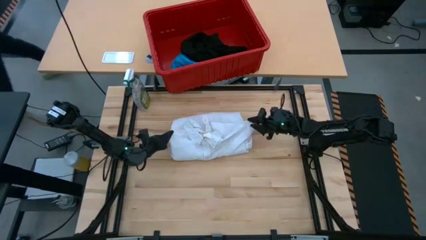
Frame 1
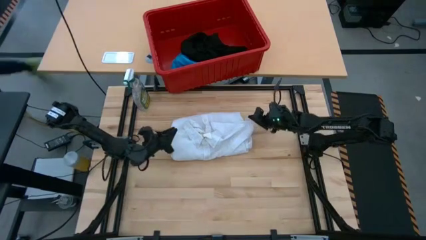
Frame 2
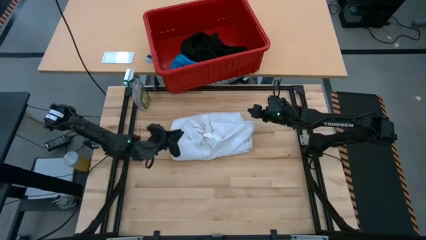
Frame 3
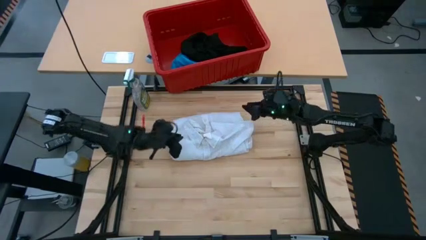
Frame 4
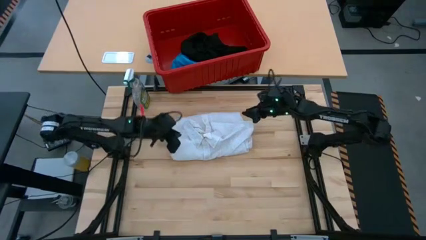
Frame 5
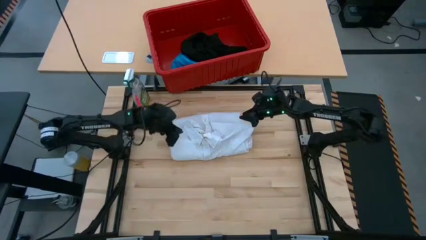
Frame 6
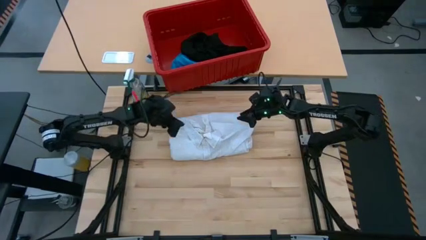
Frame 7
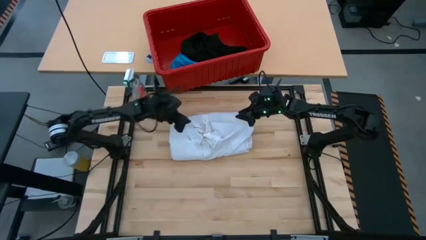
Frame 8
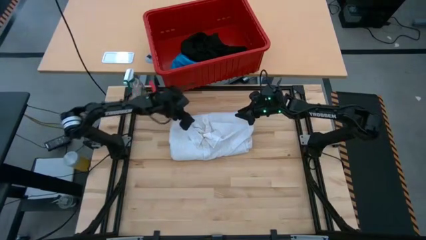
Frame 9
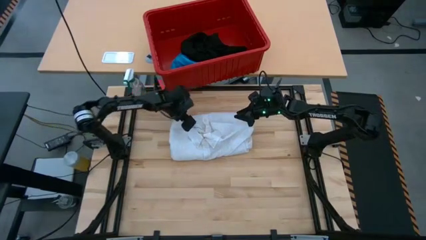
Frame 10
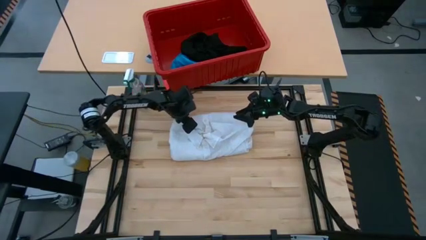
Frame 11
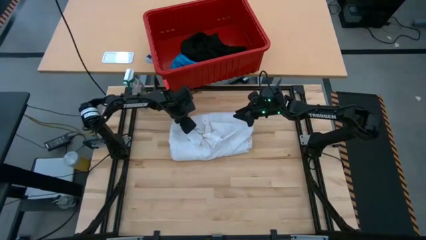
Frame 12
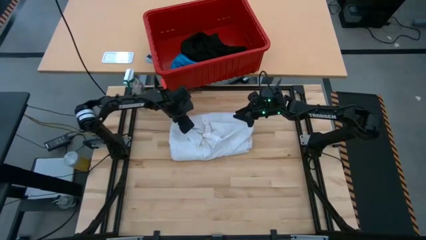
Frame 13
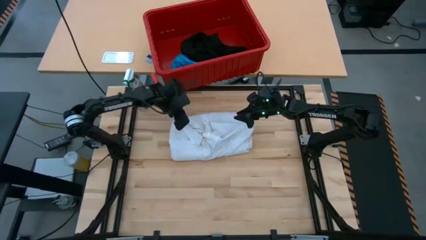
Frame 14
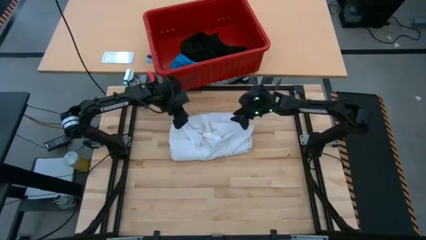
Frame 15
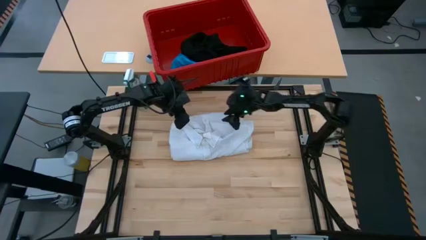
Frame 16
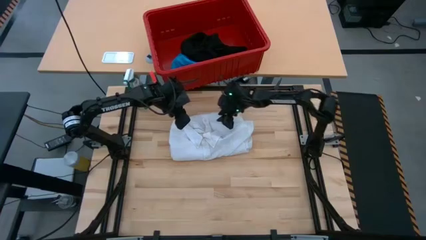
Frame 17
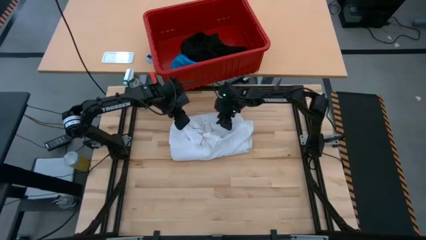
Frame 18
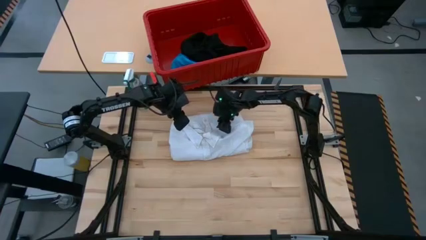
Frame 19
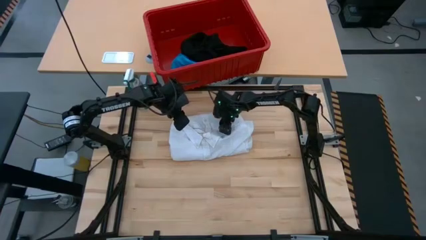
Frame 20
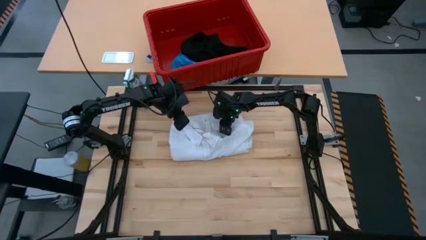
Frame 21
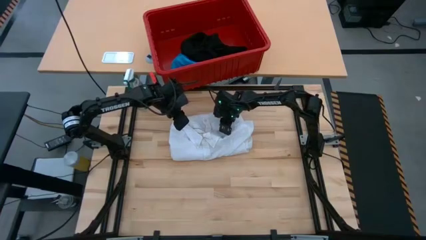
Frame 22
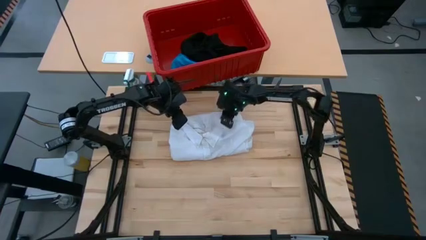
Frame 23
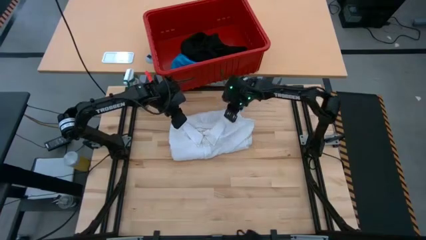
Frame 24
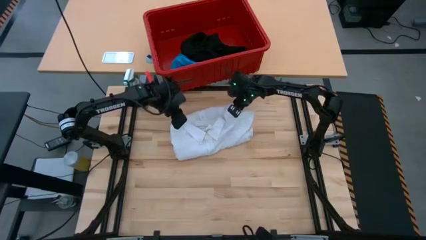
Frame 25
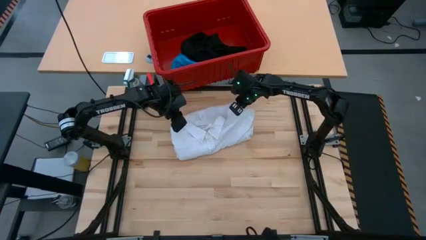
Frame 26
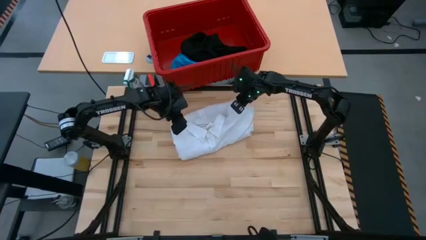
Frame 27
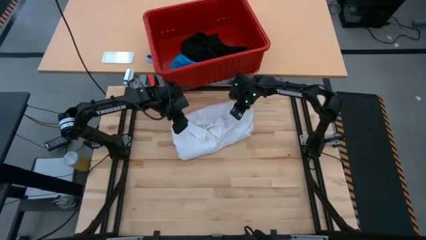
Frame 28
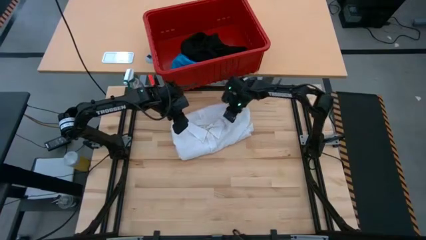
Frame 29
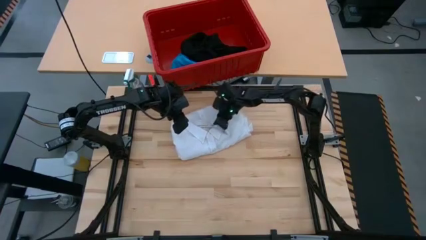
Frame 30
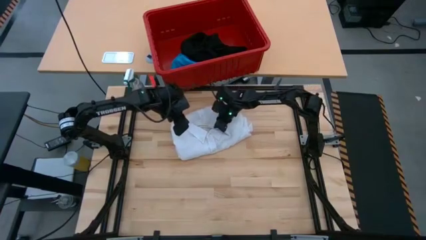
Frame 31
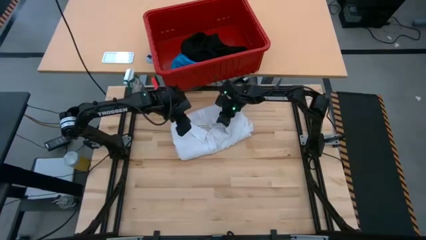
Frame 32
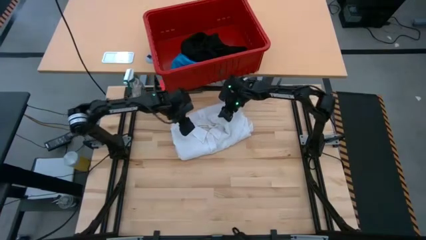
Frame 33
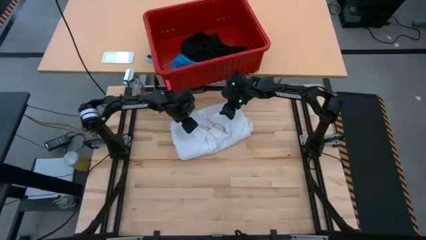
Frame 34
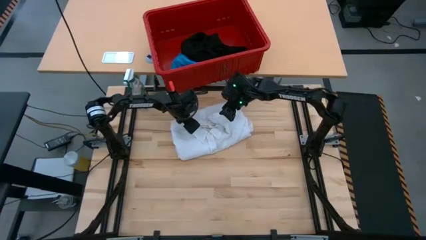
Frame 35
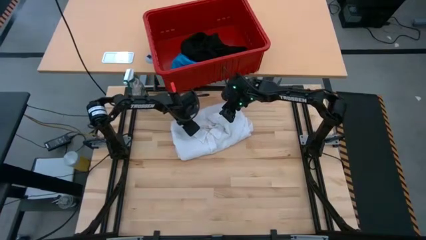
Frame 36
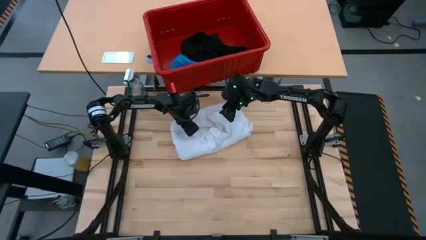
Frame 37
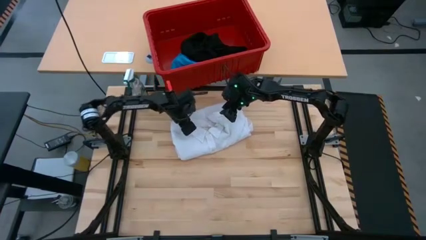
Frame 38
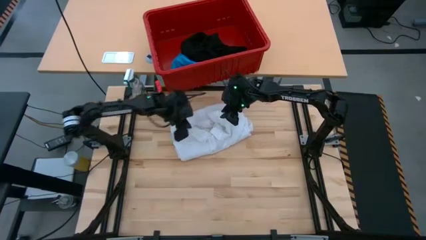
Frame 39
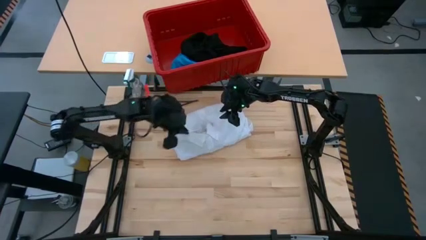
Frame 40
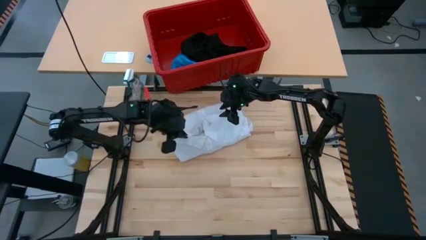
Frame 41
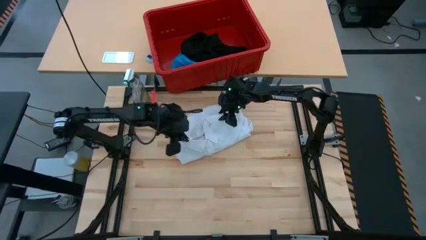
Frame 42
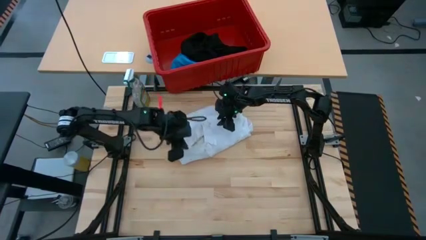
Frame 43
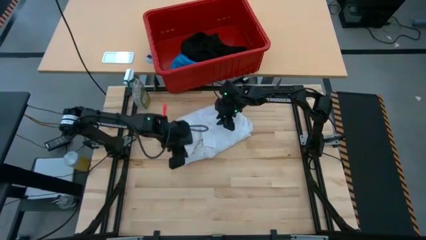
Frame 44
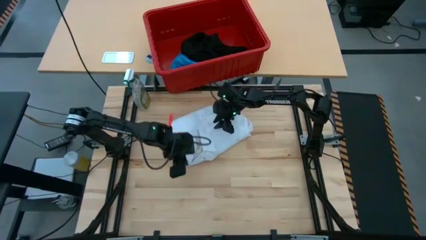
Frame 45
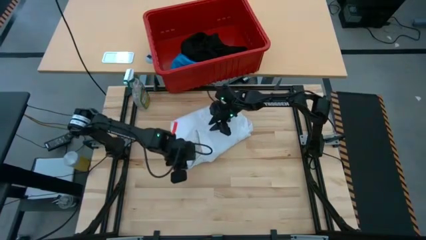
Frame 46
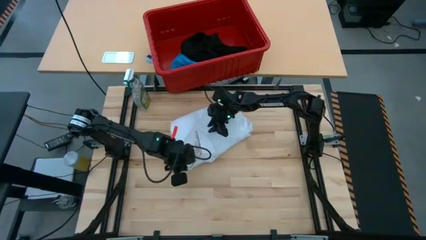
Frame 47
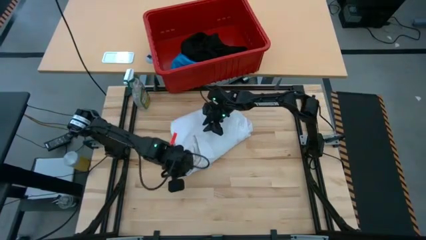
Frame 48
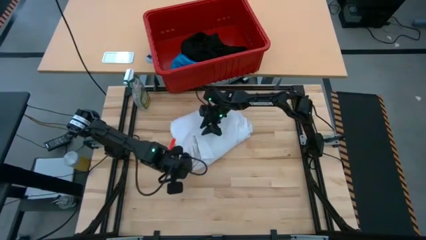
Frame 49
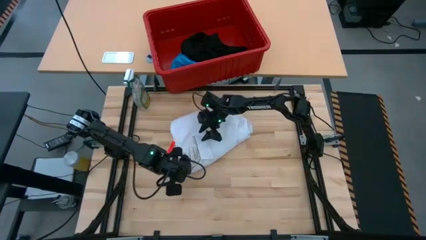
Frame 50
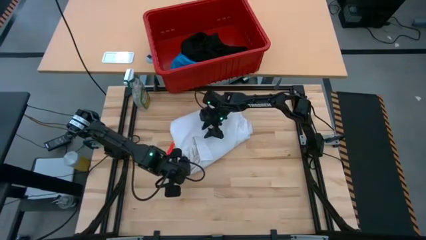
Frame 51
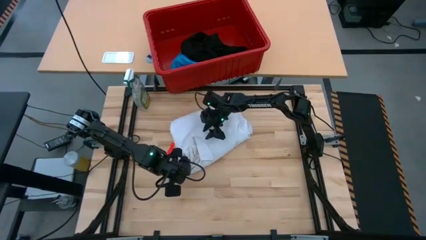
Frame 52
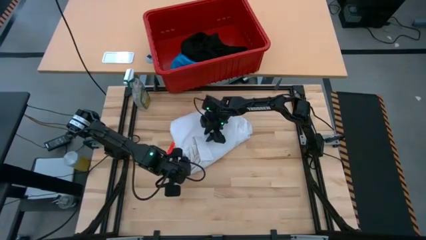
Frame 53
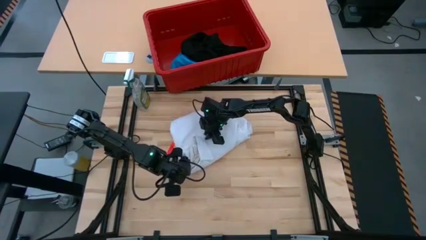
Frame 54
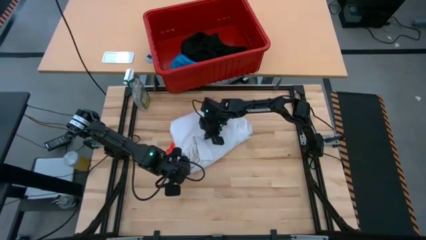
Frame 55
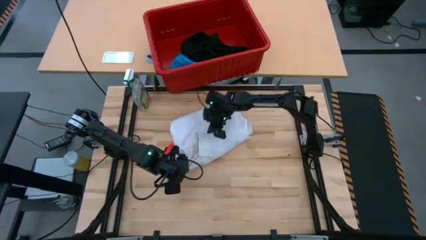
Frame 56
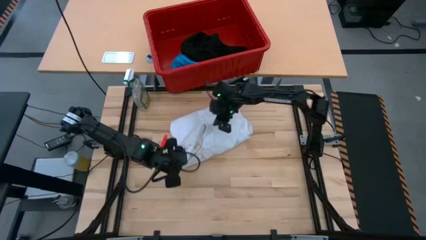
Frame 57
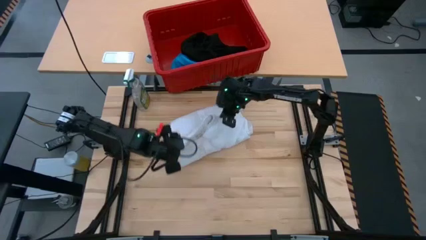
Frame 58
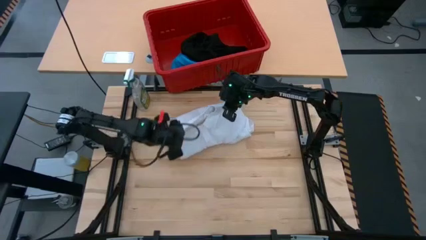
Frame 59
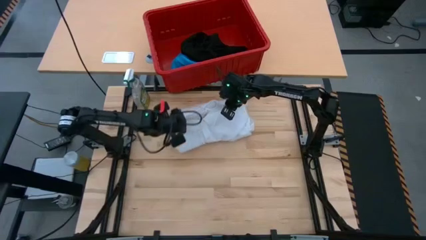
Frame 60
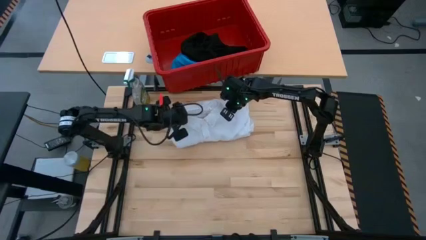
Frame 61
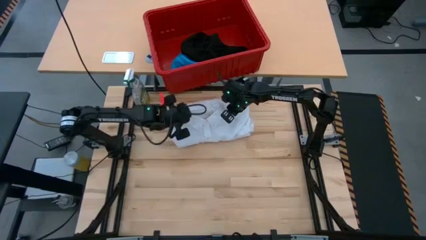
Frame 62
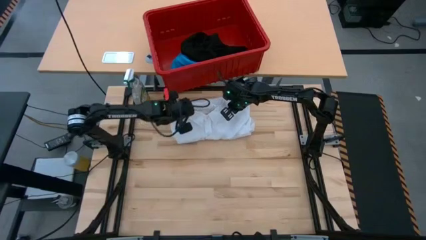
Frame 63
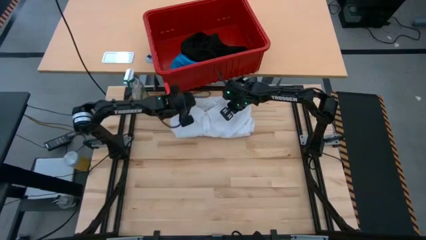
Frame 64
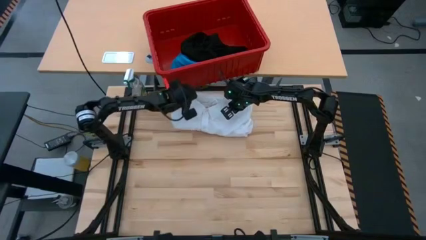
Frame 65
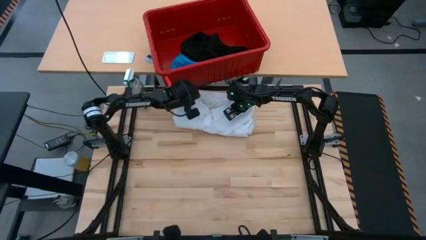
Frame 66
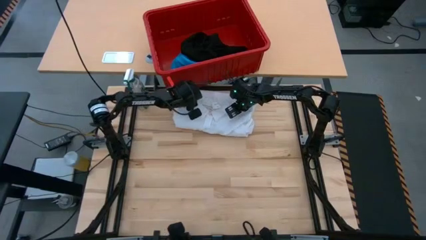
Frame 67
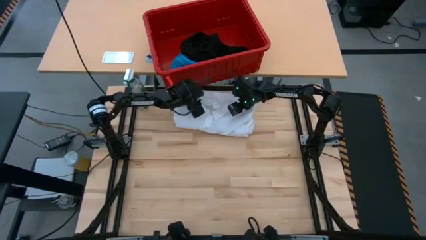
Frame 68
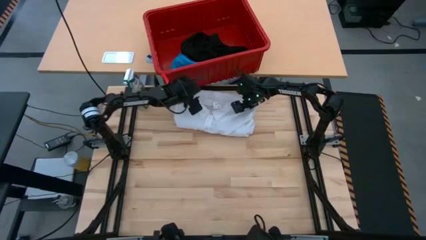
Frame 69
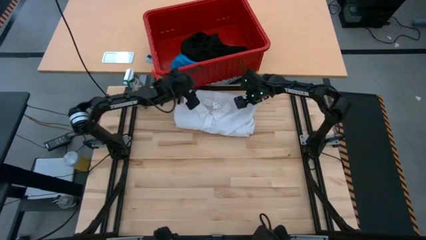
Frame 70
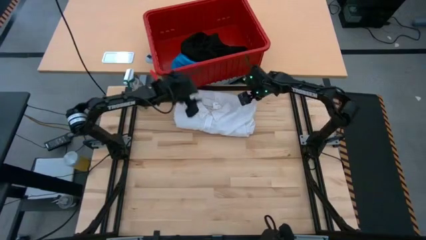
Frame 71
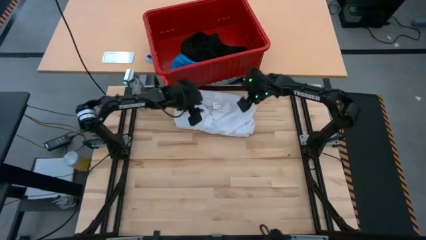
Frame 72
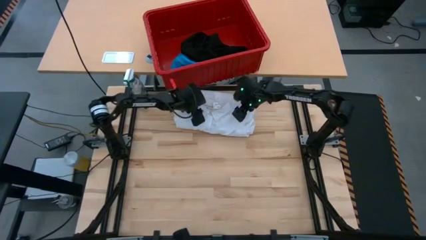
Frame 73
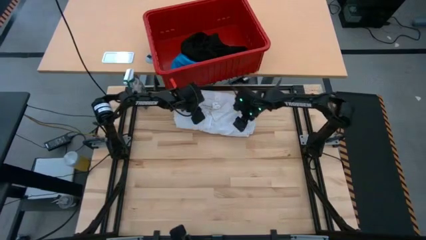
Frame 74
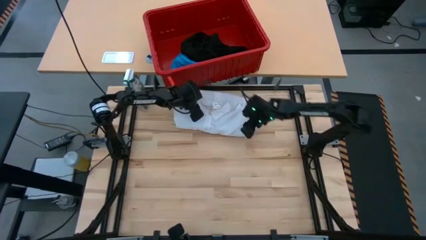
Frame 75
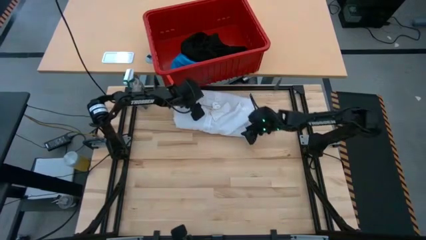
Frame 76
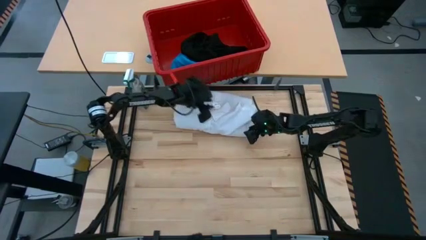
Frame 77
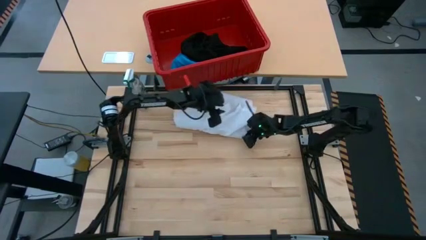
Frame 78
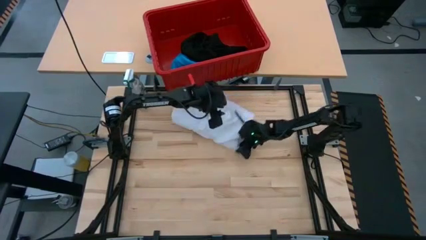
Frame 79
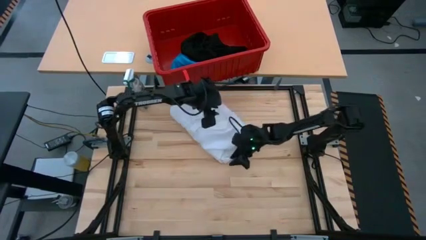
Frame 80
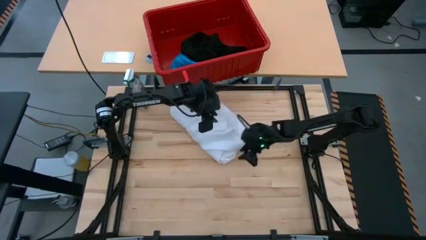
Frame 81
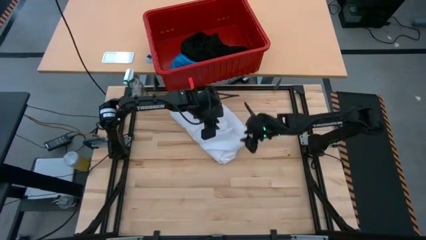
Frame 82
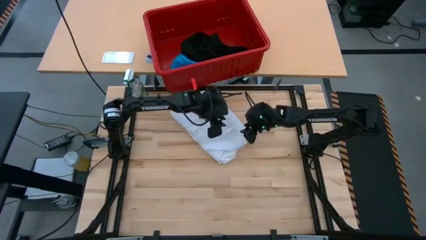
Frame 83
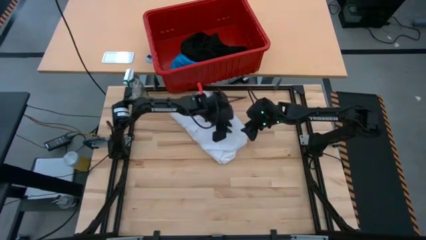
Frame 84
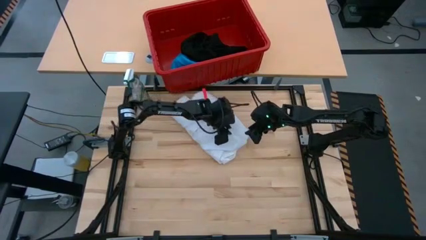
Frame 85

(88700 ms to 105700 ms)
Task: Fold laundry
Fold the white polo shirt

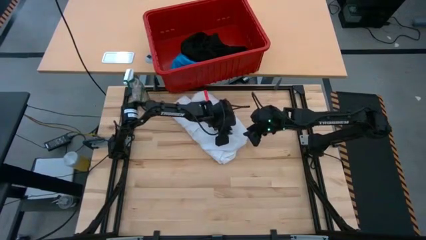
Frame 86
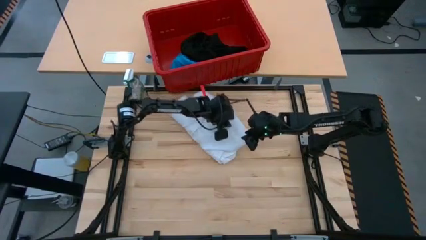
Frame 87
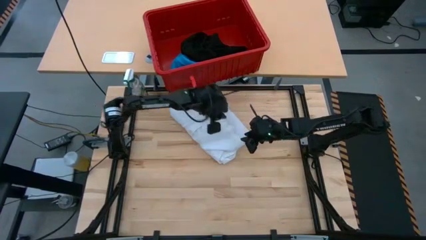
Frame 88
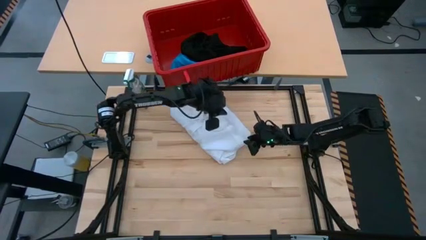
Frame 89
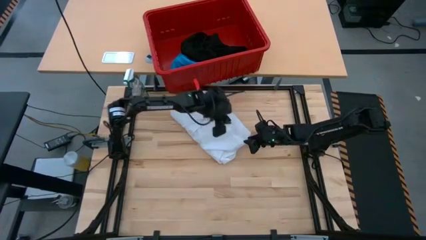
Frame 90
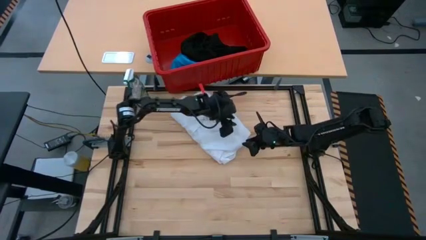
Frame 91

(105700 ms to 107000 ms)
Fold the white polo shirt
